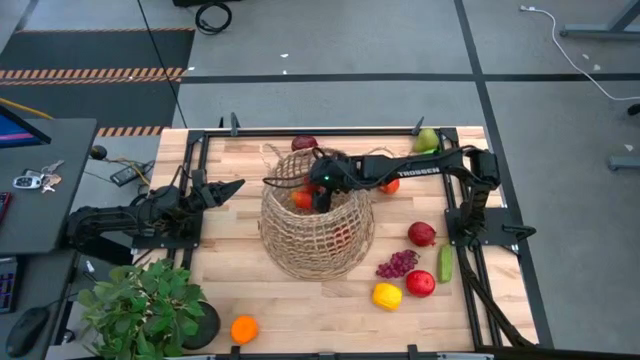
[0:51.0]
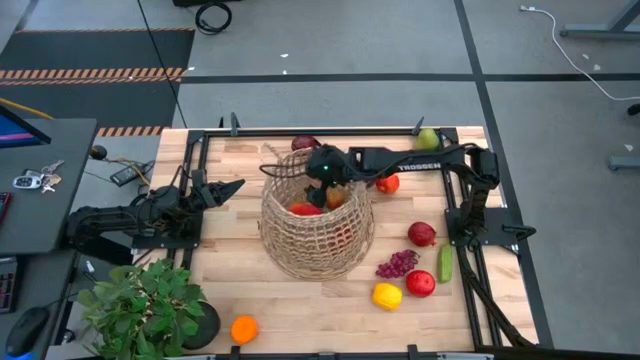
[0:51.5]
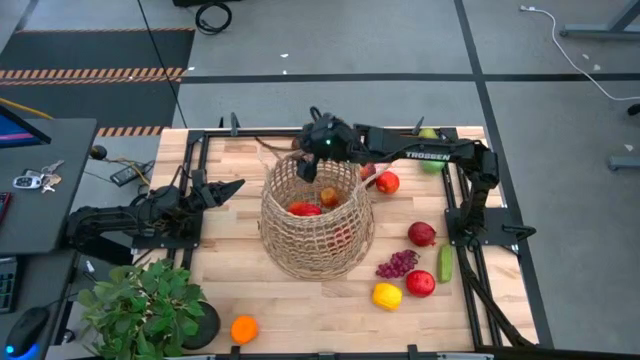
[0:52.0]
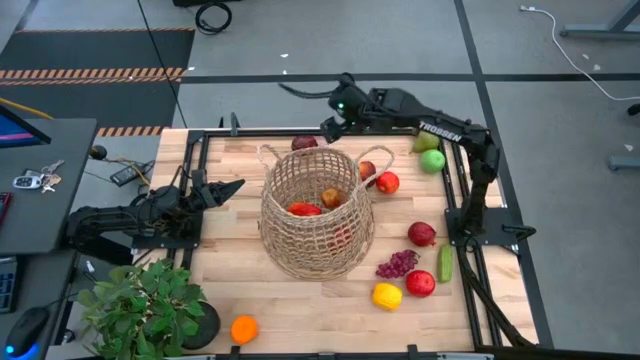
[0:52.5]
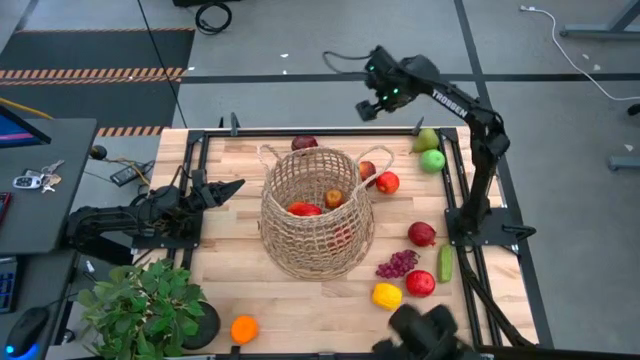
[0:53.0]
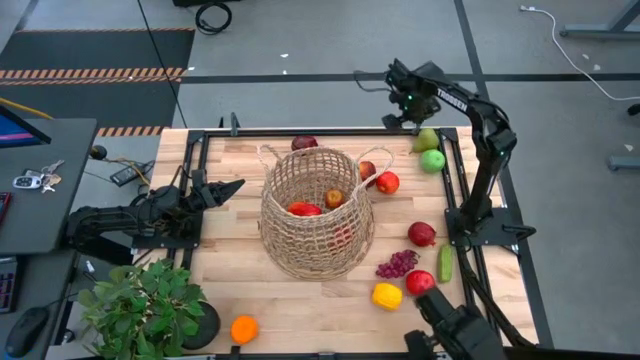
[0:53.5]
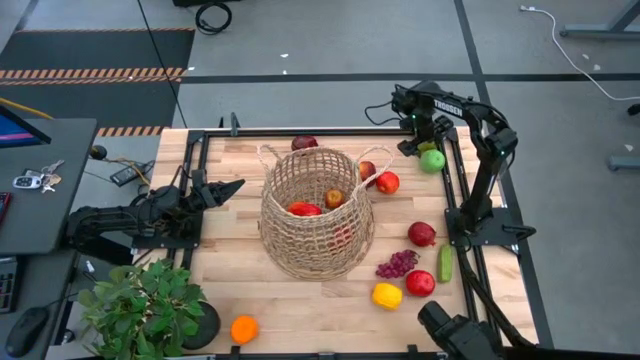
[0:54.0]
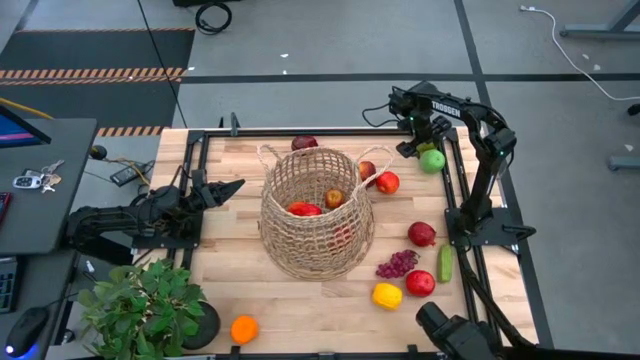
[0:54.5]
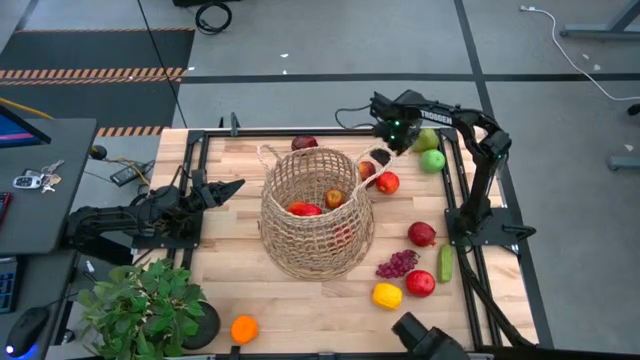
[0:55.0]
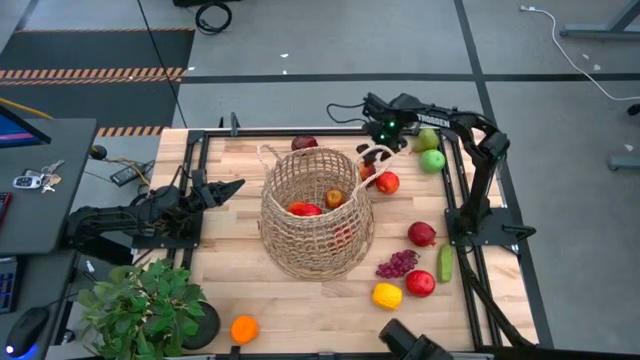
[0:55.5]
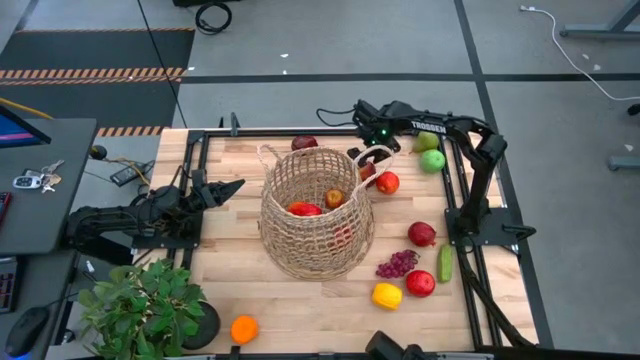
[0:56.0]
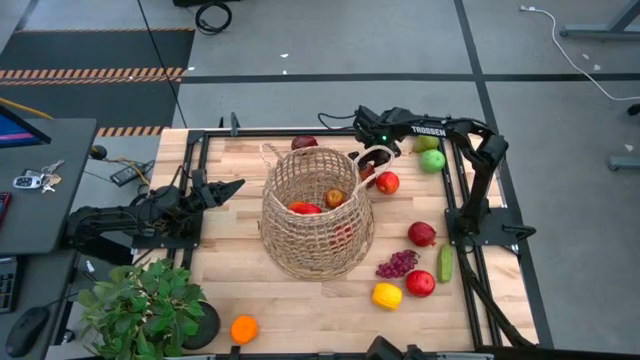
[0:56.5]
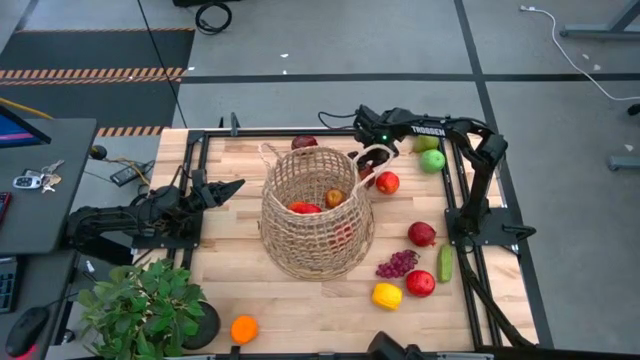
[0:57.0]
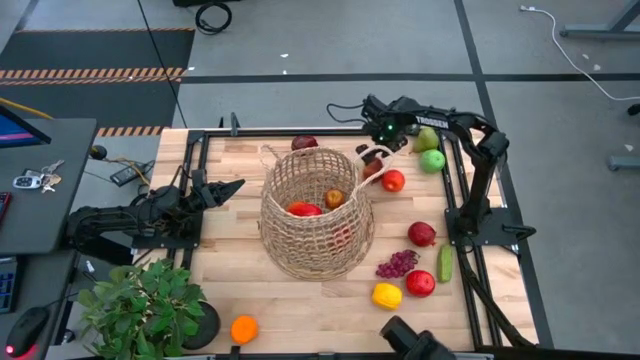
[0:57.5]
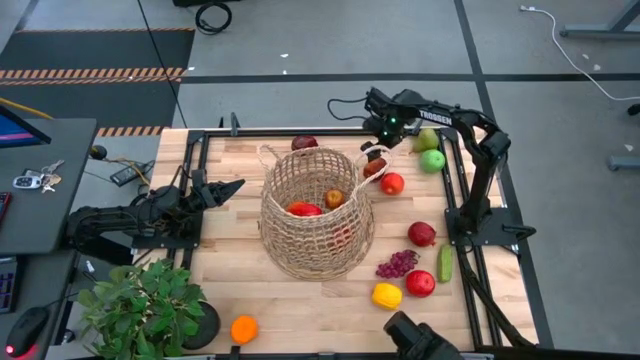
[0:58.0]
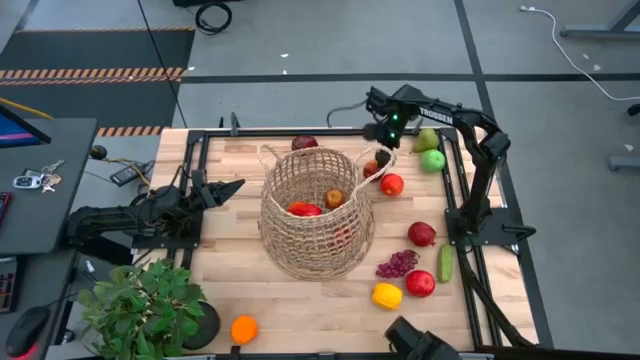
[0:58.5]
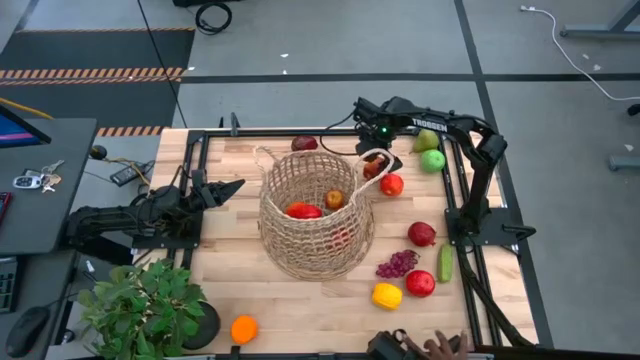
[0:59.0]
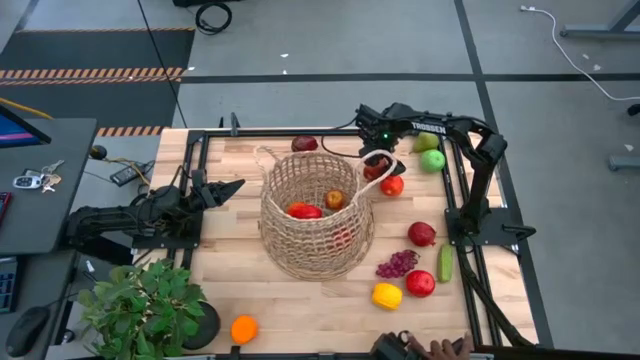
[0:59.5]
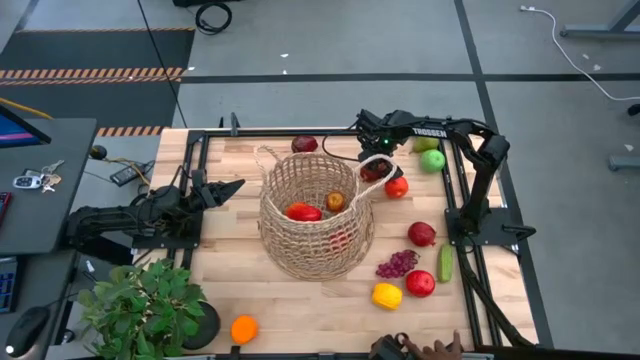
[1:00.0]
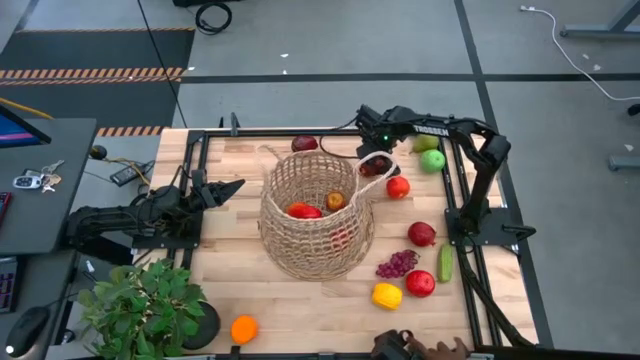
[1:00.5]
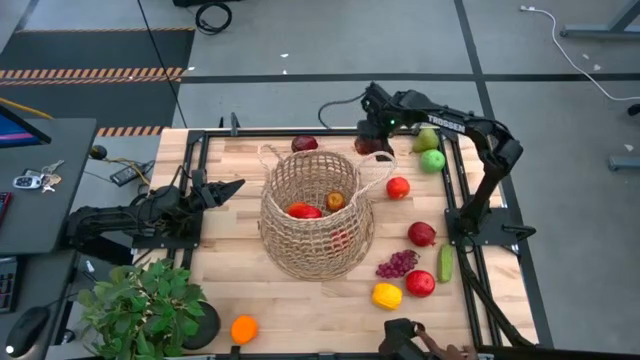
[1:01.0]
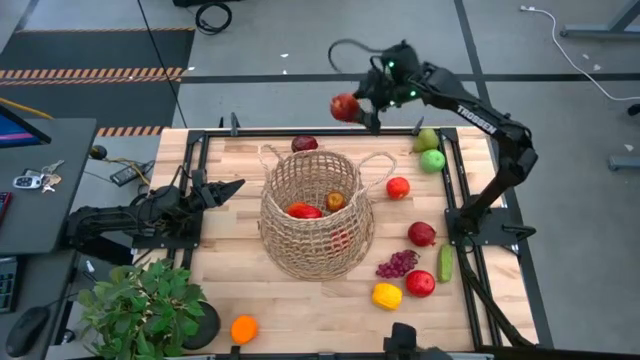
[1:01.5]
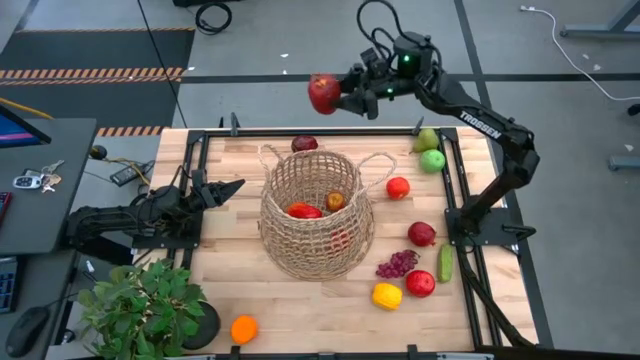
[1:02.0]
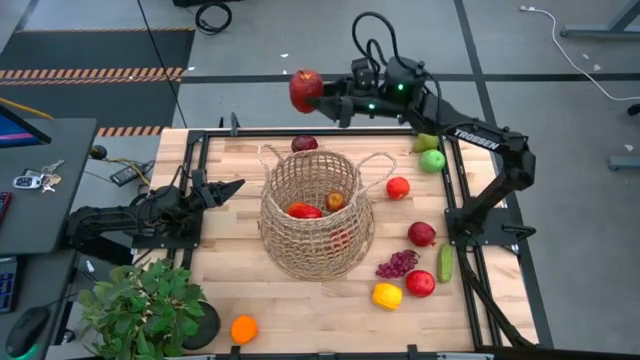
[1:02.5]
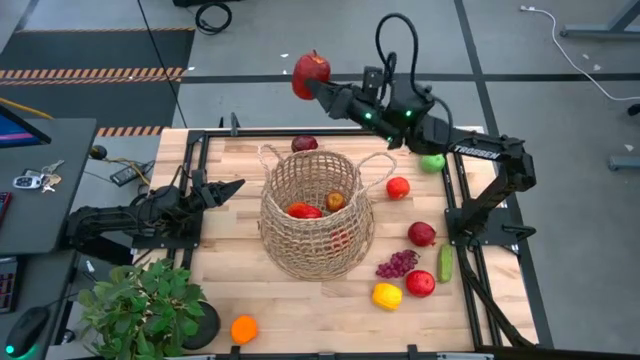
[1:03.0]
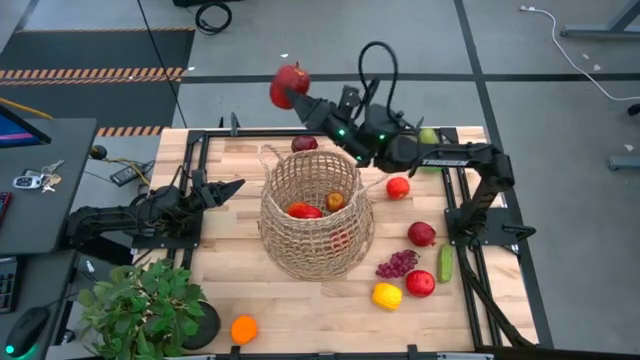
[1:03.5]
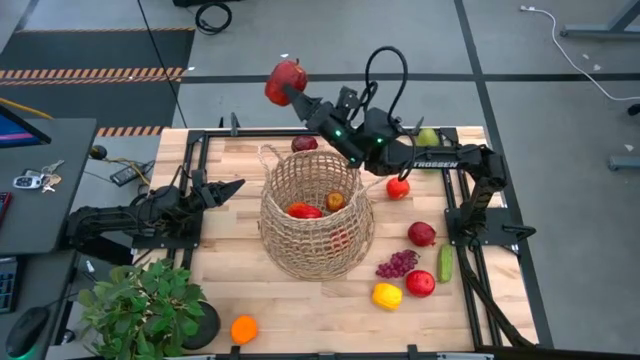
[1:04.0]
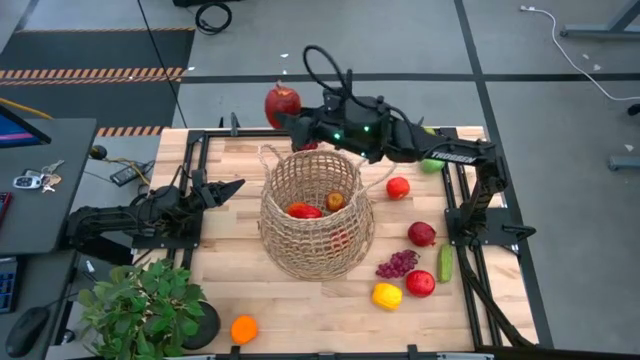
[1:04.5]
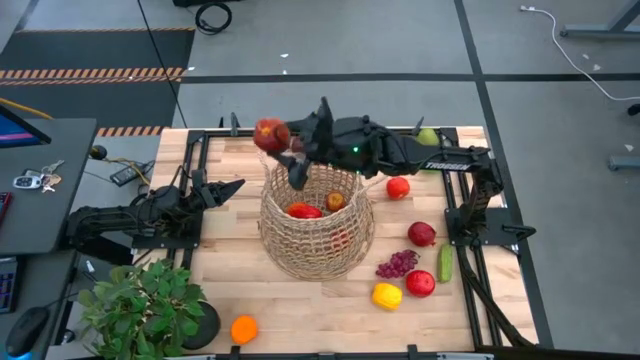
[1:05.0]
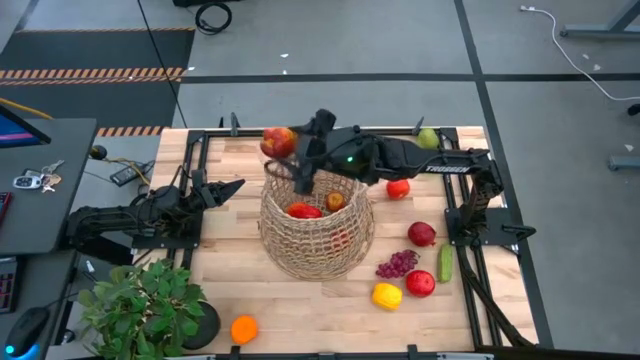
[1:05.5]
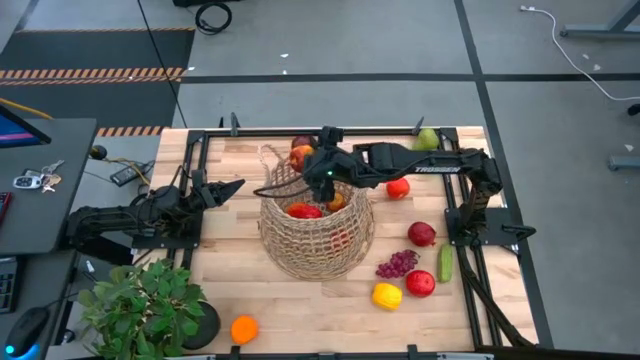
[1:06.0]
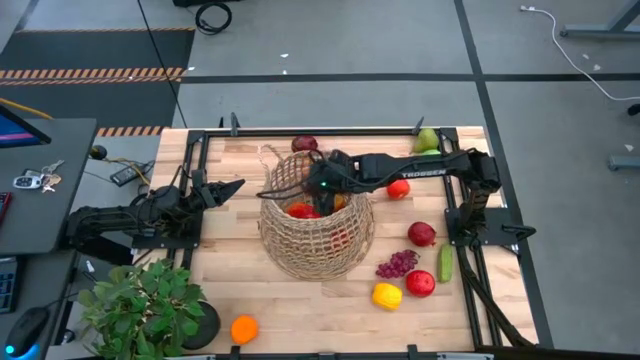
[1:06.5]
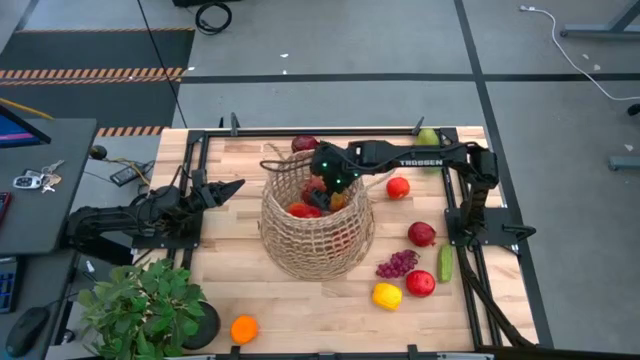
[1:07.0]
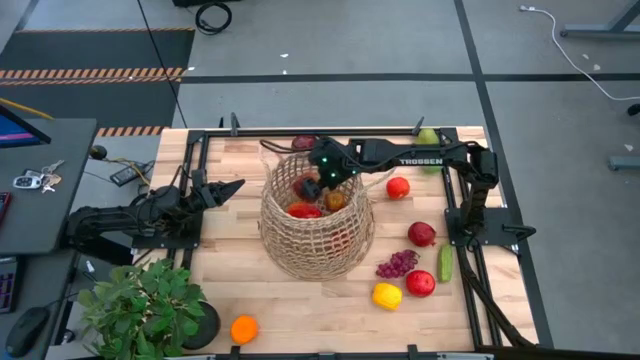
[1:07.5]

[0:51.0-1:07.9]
Task: Build produce basket
Put the red apple into the basket

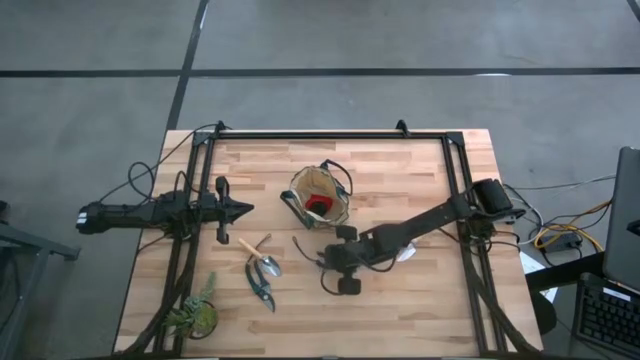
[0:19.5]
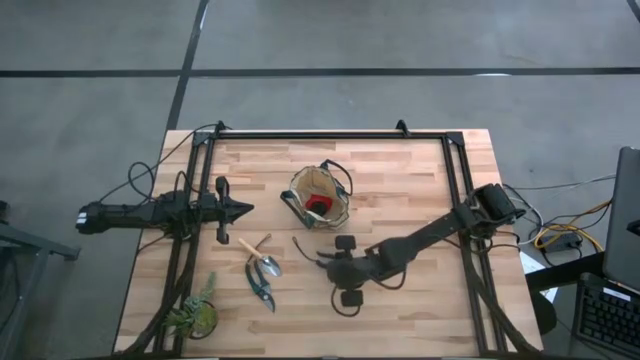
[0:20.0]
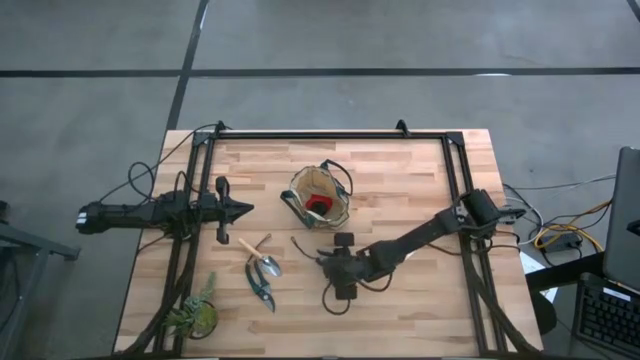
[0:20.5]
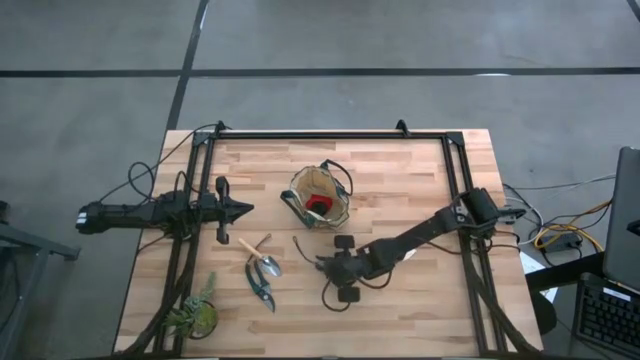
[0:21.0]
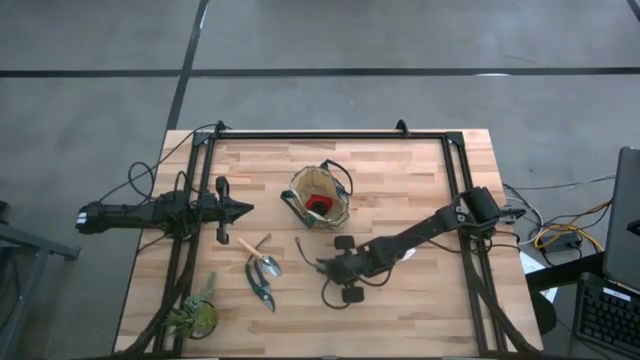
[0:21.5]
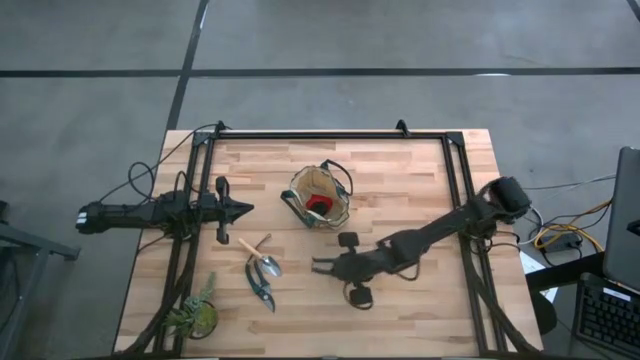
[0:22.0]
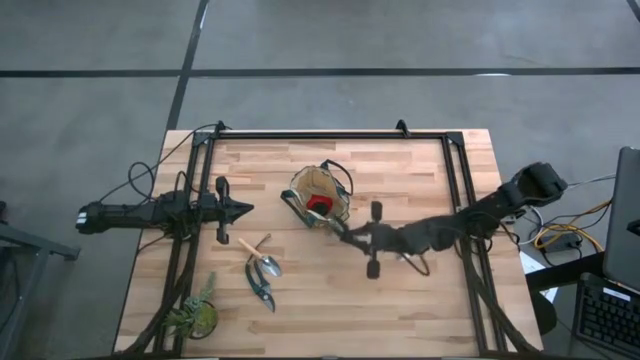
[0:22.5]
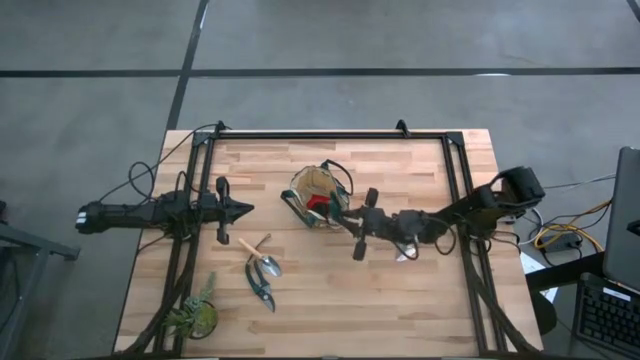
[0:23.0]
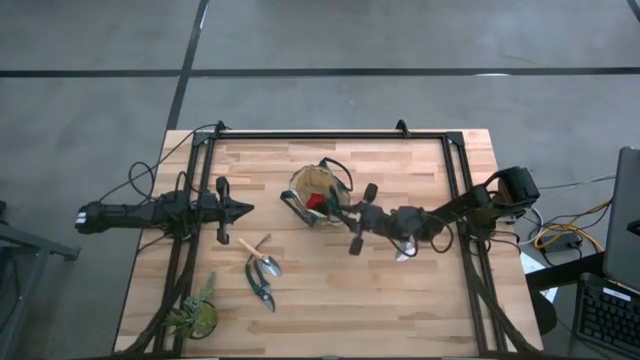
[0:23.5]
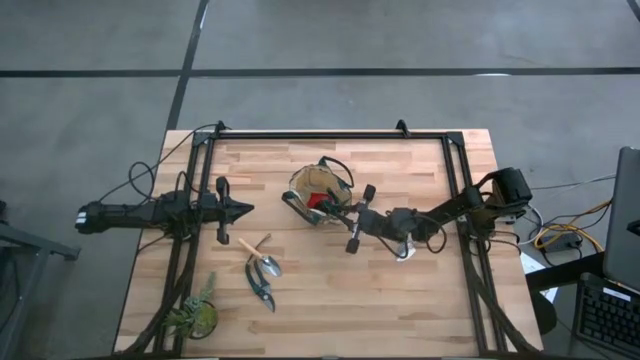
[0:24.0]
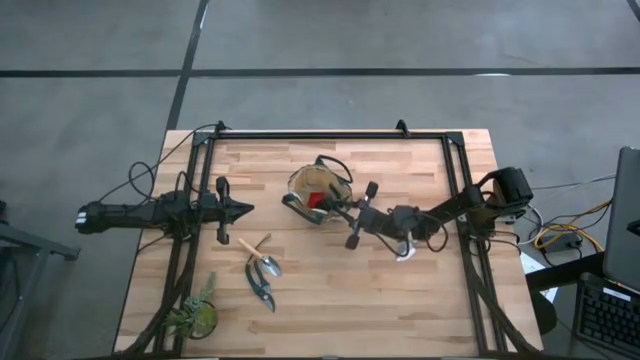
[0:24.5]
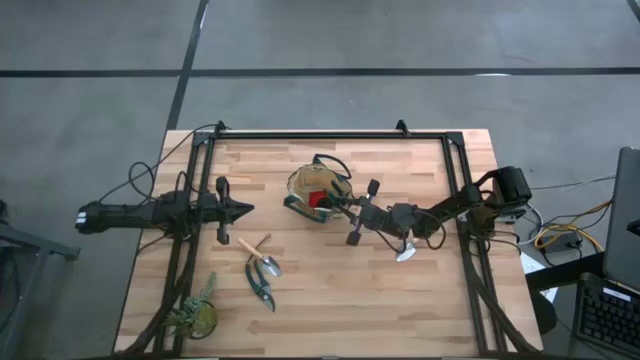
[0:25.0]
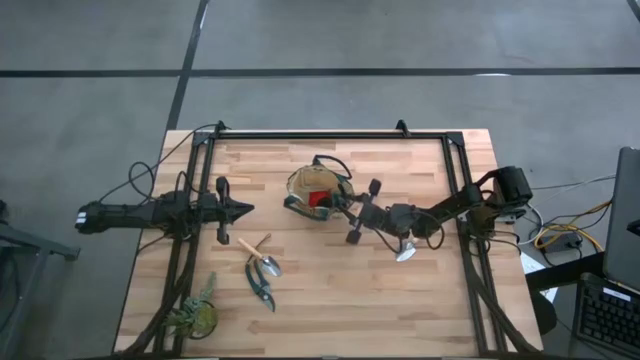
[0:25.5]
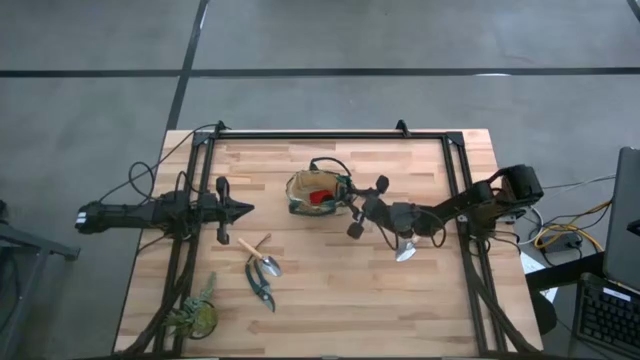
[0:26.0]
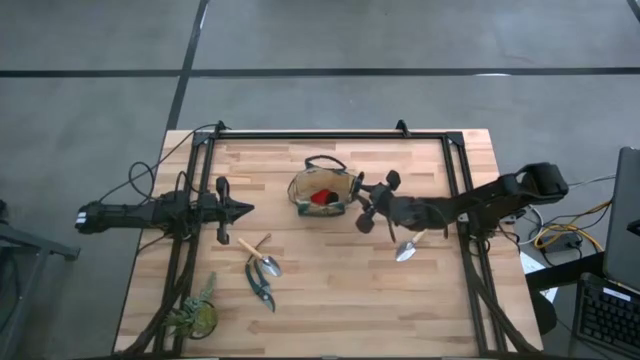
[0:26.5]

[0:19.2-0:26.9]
Task: Pick & Place Garden tools in Gardening bag
Put the right green shear scissors into the gardening bag
